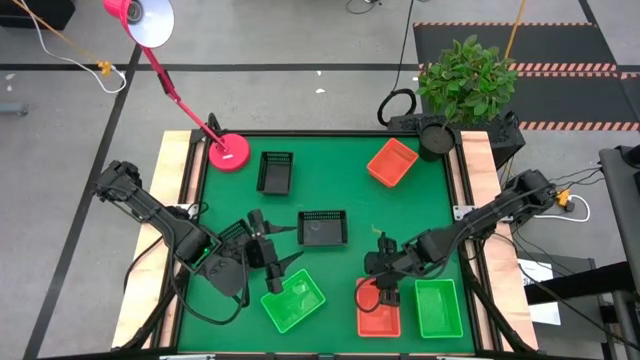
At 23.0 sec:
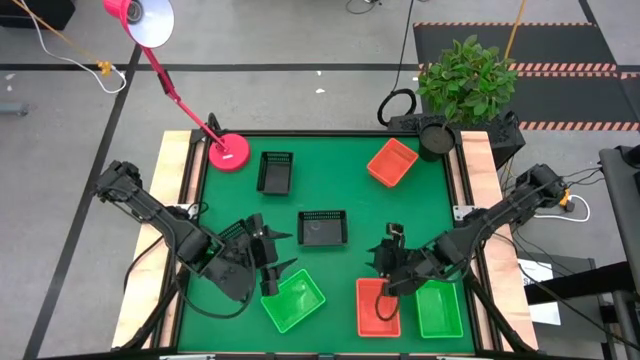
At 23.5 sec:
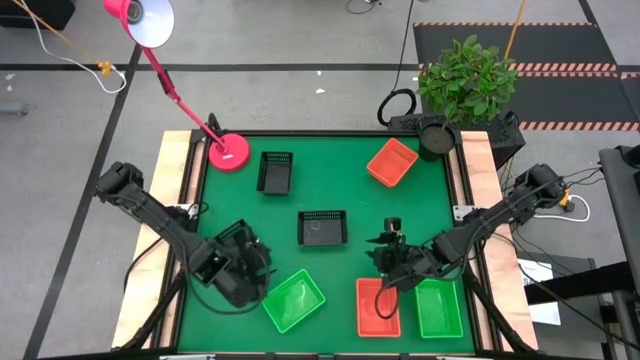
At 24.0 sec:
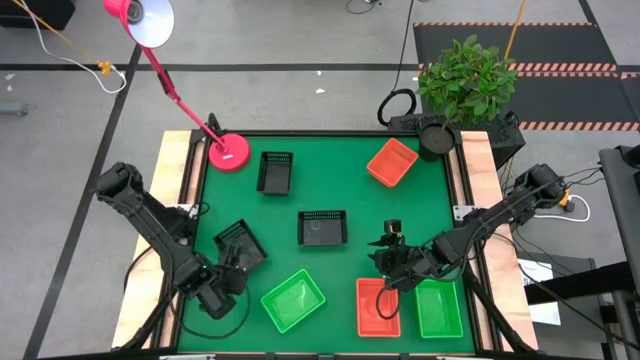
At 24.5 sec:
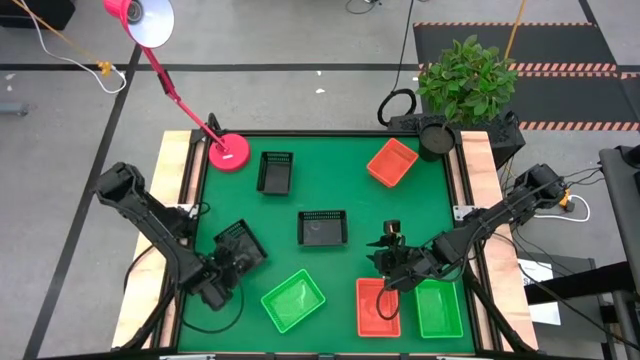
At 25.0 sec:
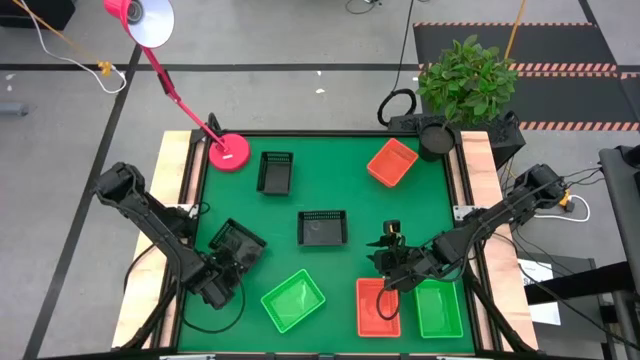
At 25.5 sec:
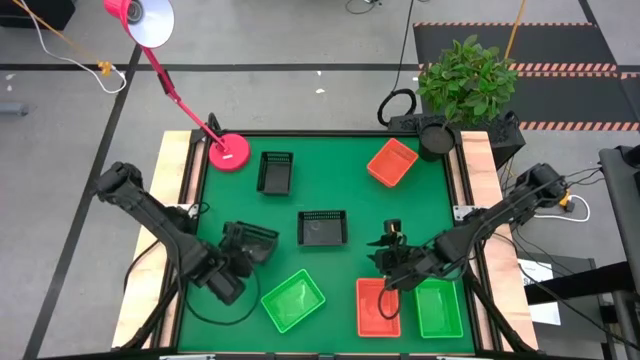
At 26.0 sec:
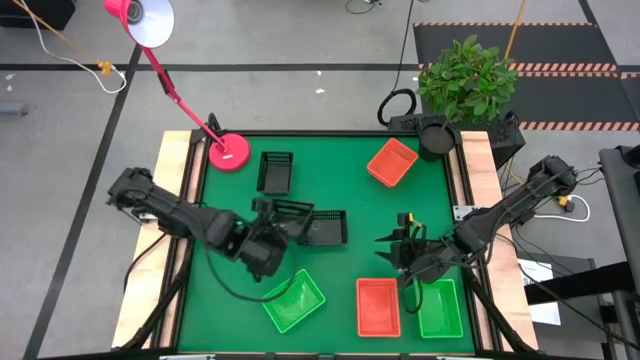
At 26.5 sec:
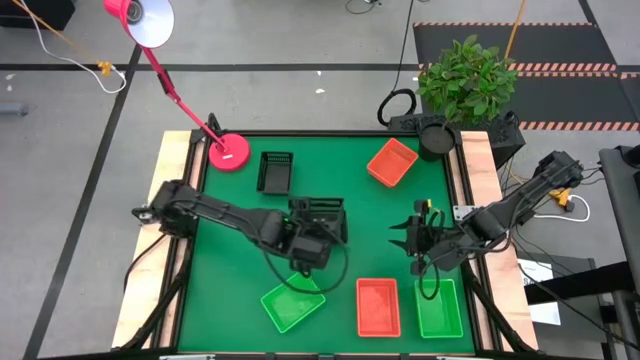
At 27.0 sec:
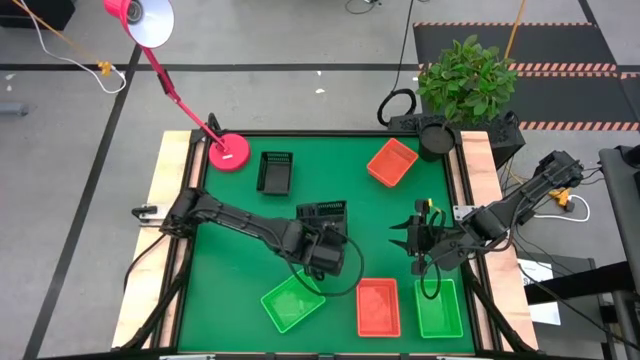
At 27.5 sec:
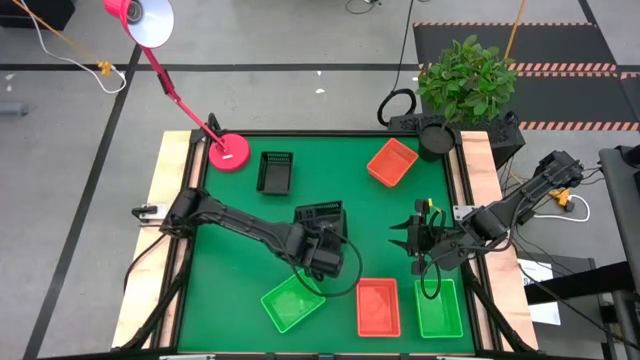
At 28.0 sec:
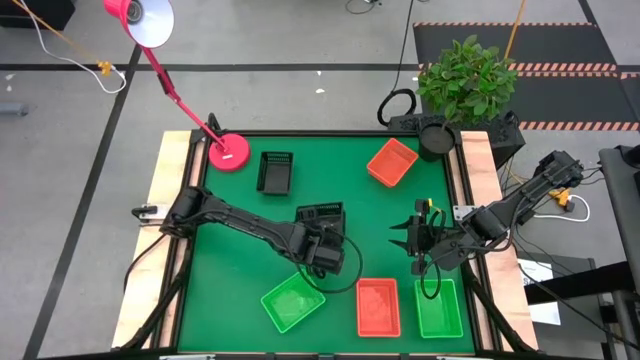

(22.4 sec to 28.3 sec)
Stack the bottom left black bin on top of the bottom right black bin

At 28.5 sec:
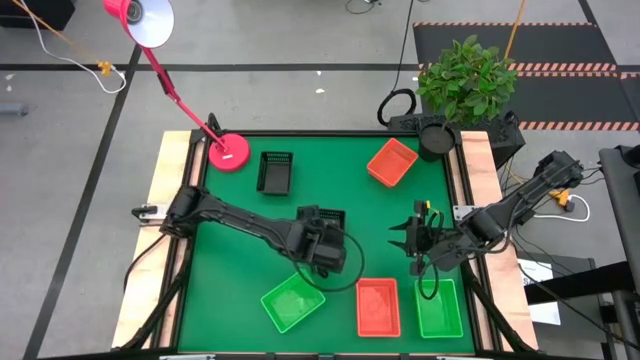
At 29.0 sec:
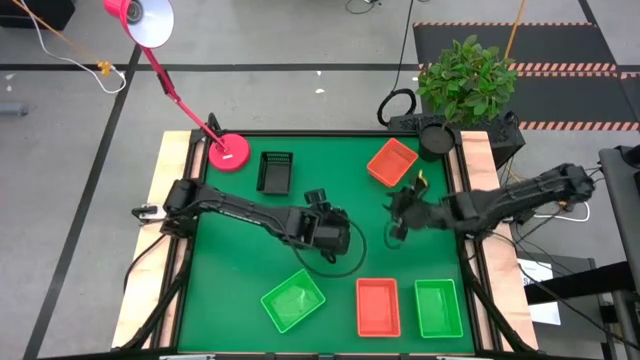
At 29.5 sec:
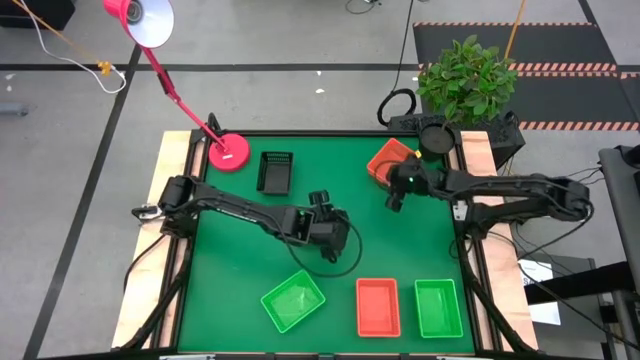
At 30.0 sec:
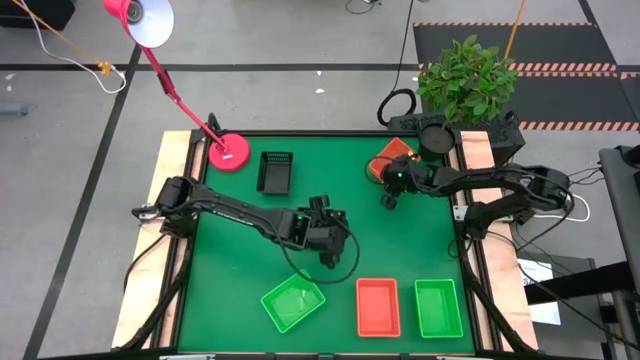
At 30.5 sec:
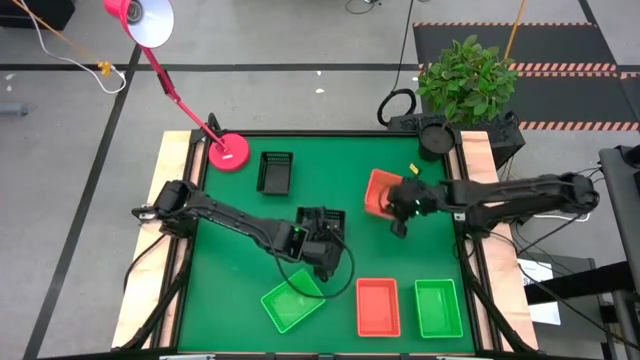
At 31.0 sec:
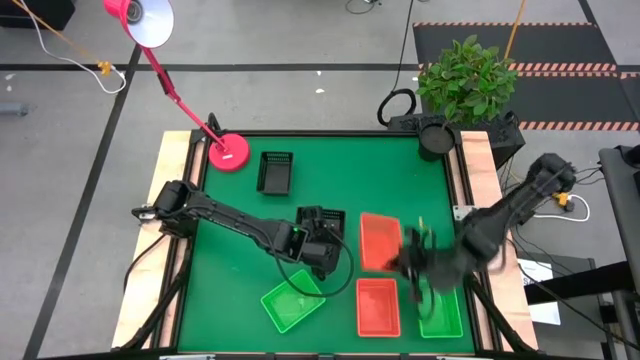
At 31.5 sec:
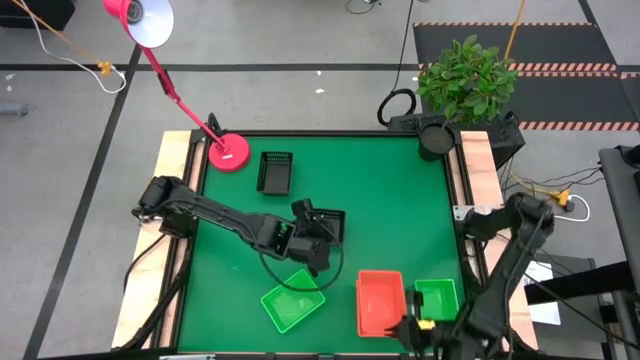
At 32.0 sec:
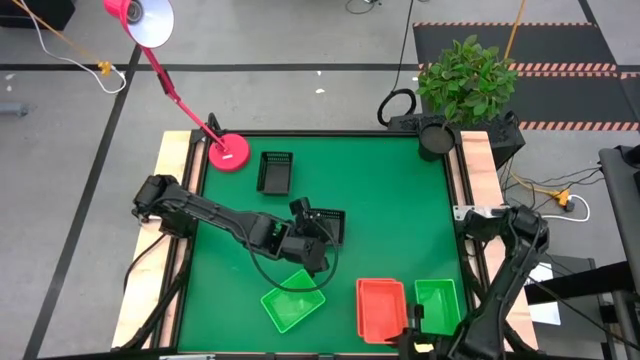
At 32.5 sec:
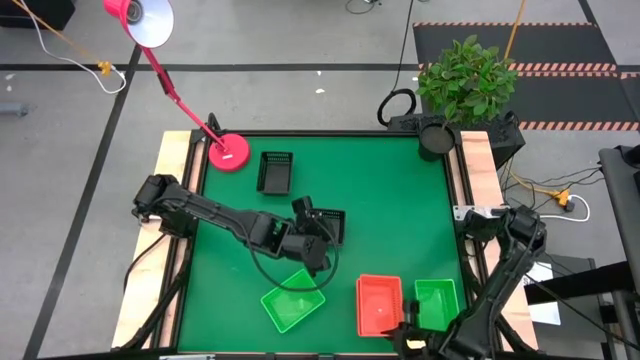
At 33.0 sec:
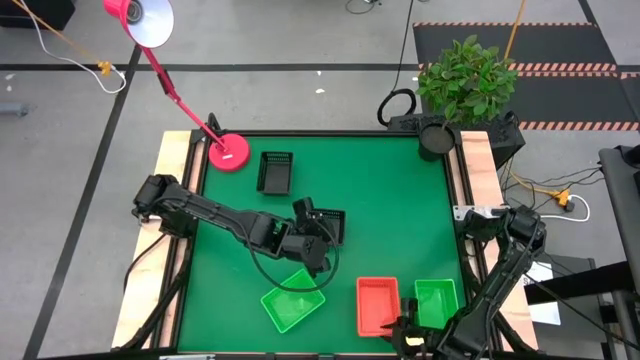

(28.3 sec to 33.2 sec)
Stack the top orange bin on top of the bottom stacked orange bins

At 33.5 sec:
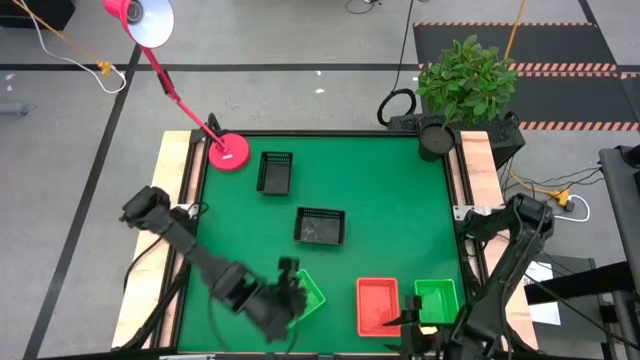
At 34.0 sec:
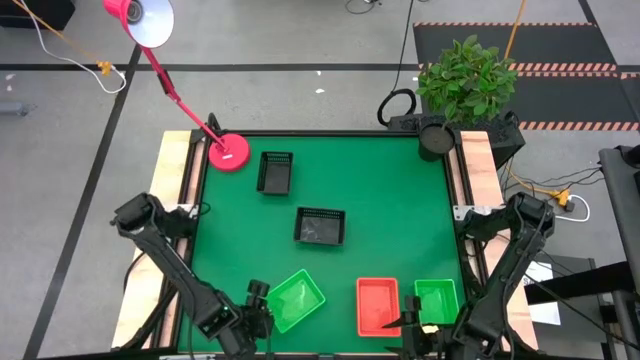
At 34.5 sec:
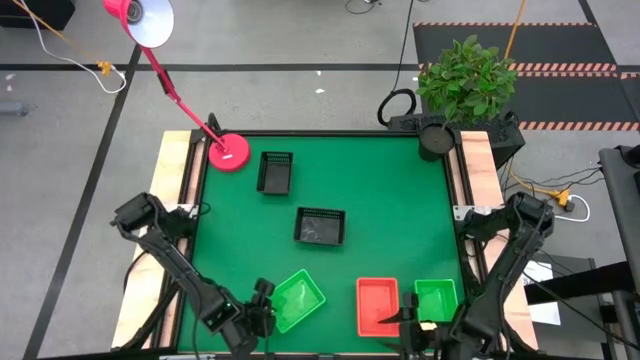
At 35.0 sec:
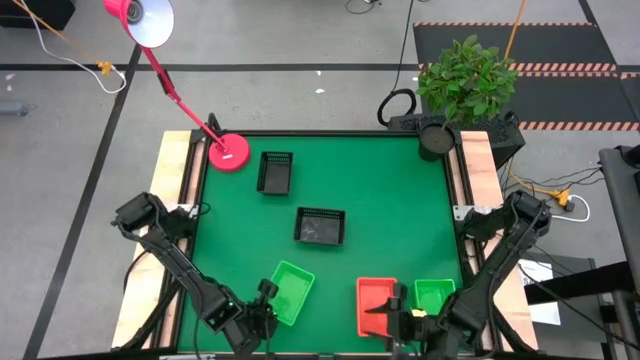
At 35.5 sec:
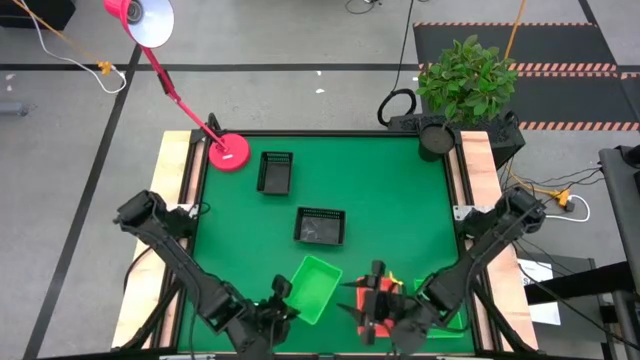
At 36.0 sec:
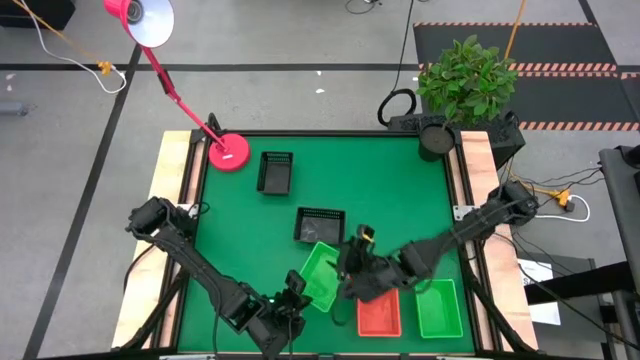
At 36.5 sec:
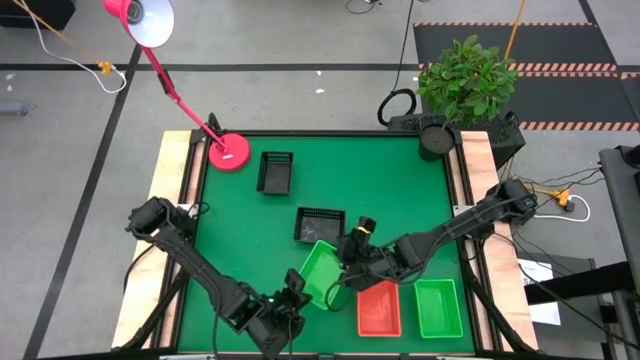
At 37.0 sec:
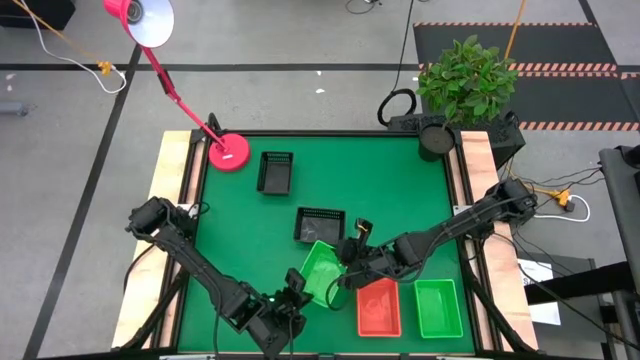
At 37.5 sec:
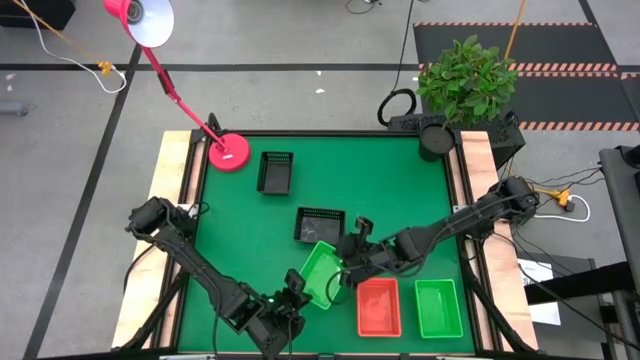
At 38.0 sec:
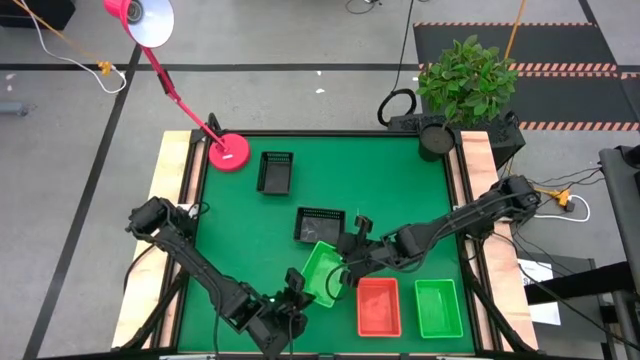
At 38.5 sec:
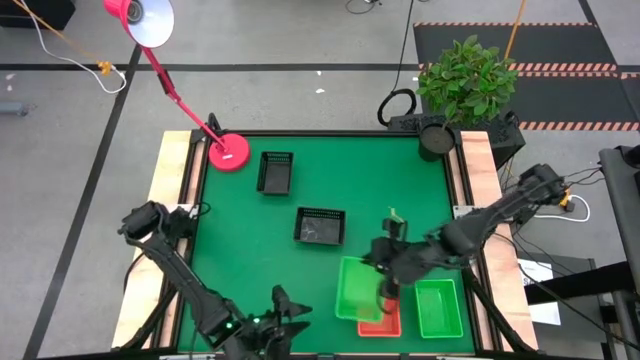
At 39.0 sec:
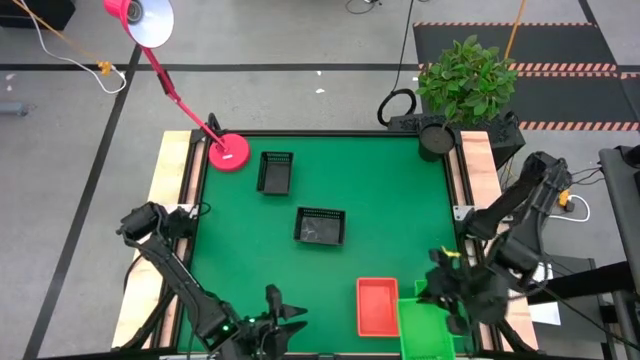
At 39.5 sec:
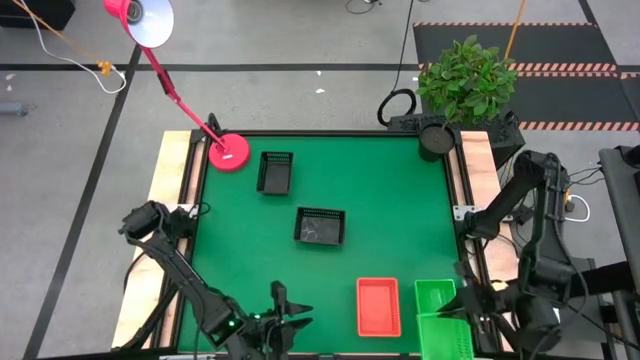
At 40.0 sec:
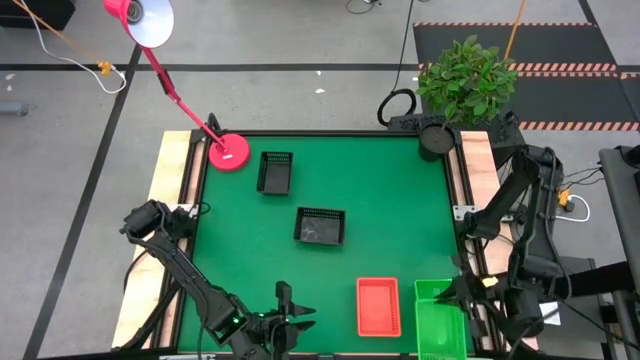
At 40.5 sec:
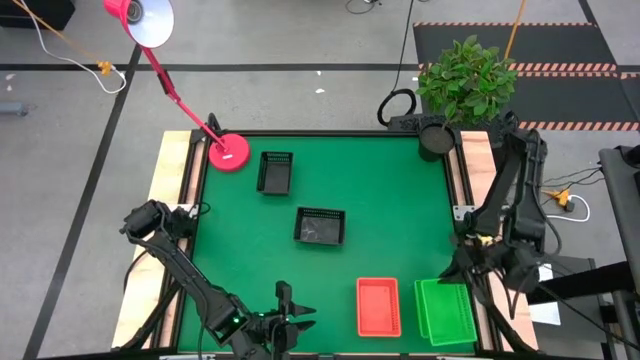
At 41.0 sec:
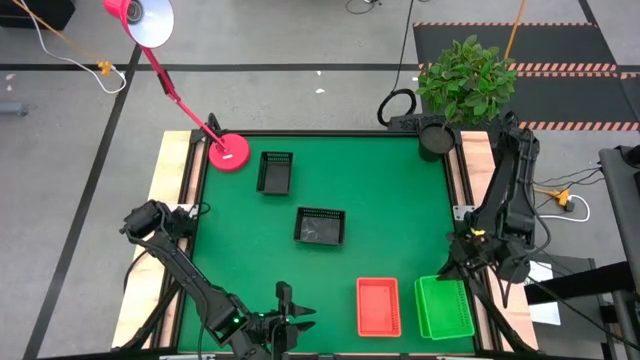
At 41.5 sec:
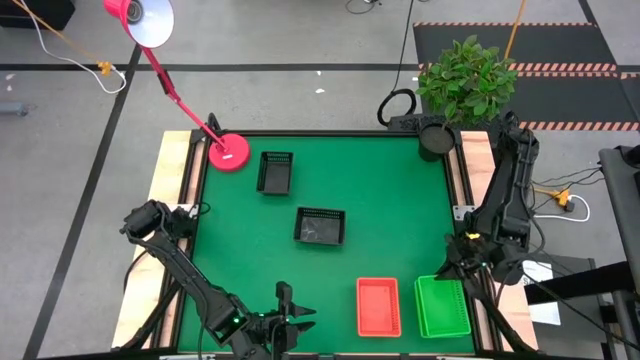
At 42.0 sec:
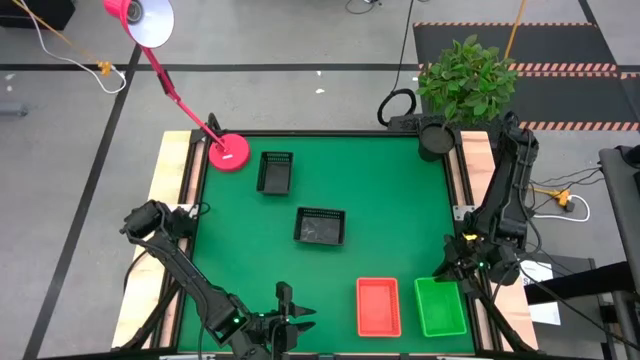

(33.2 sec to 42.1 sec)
Stack the left green bin on top of the right stacked green bins
